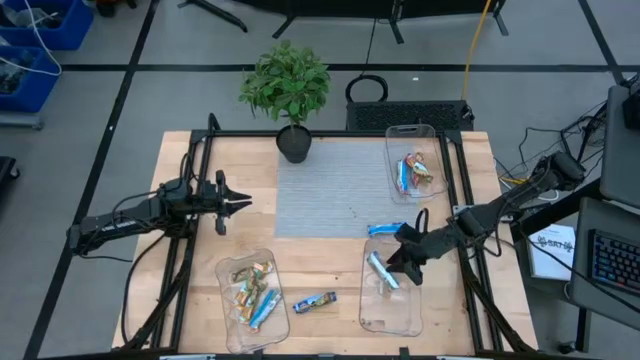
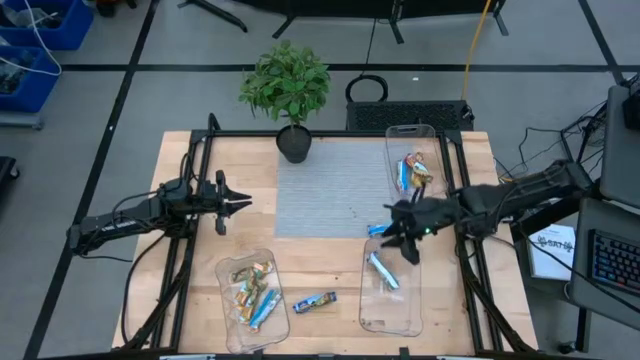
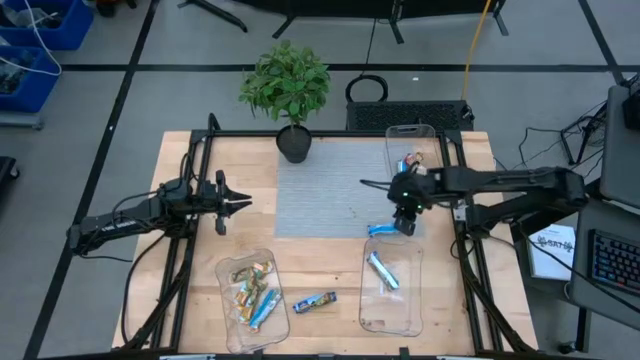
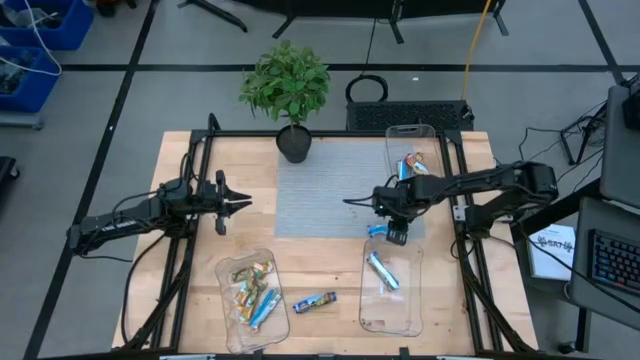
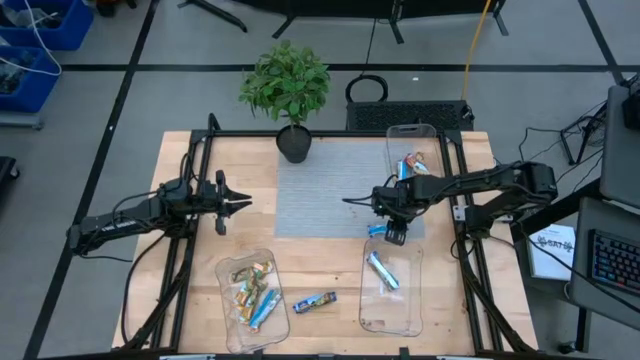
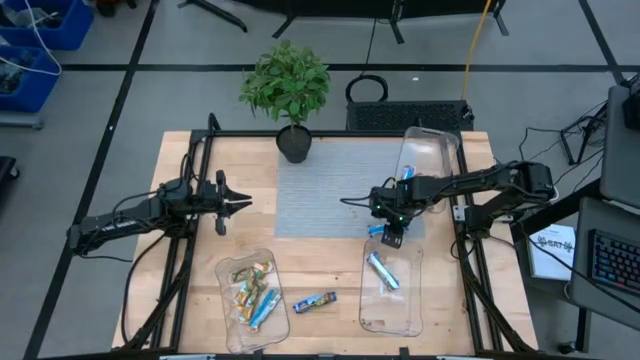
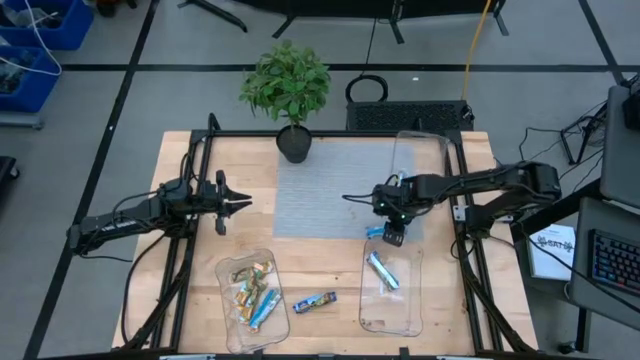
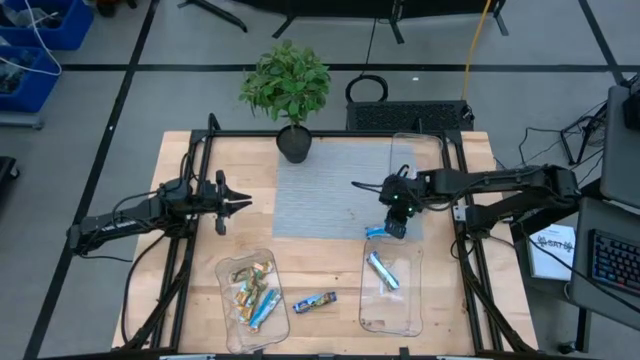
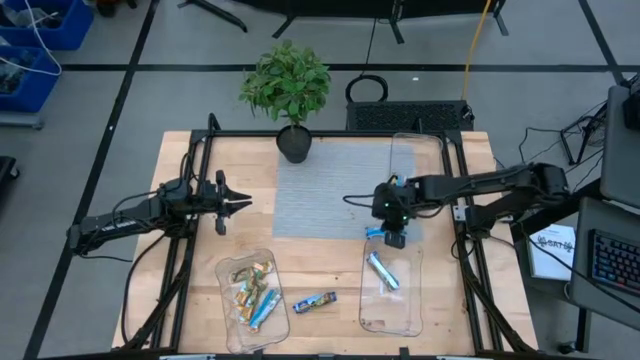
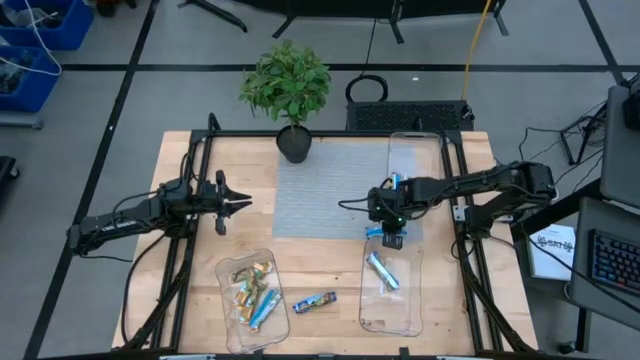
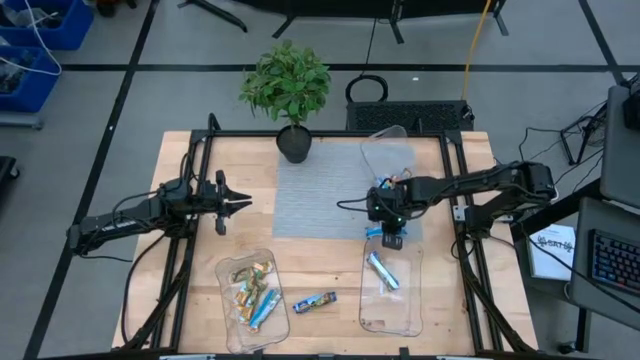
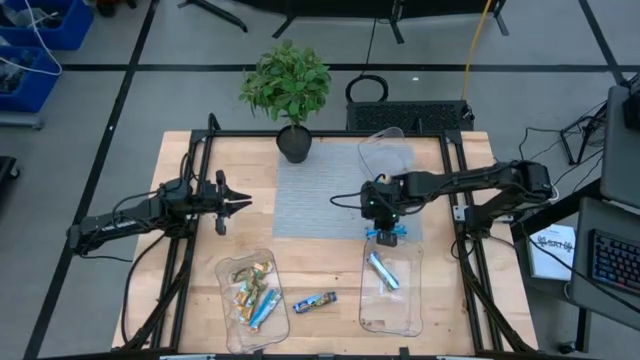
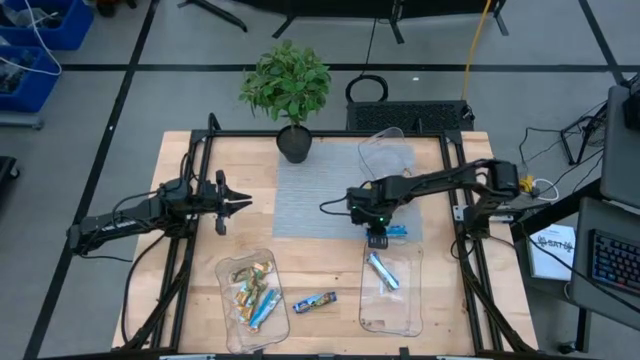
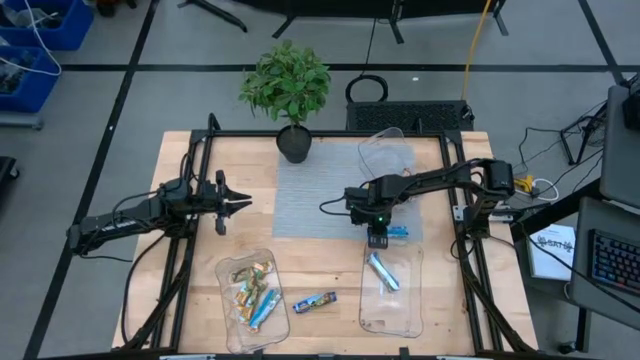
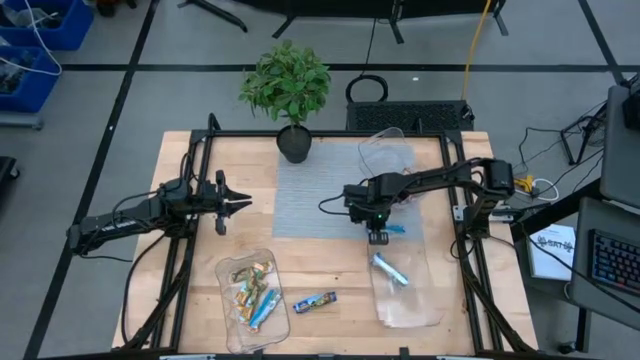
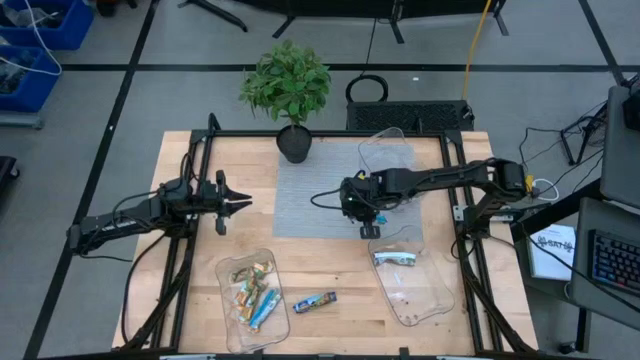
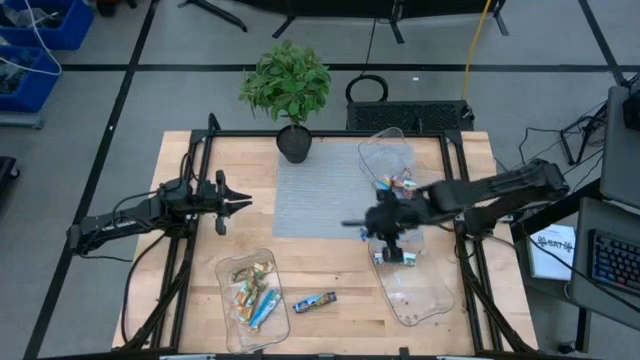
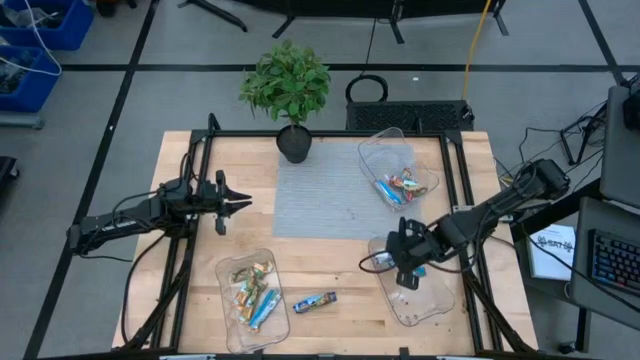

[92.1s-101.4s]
Task: Pick and place Granola Bars by type
Put the top blue granola bar into the bottom right transparent bin

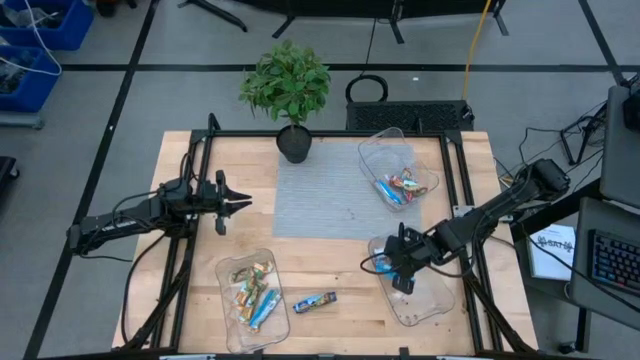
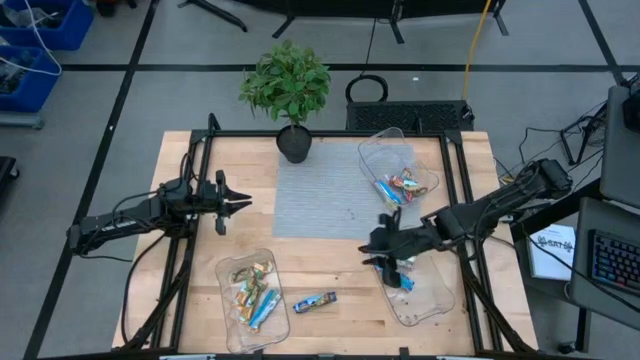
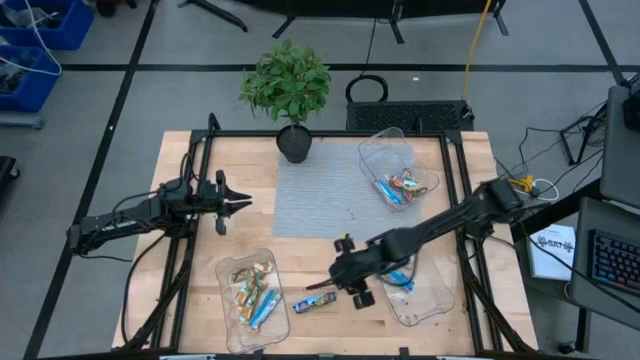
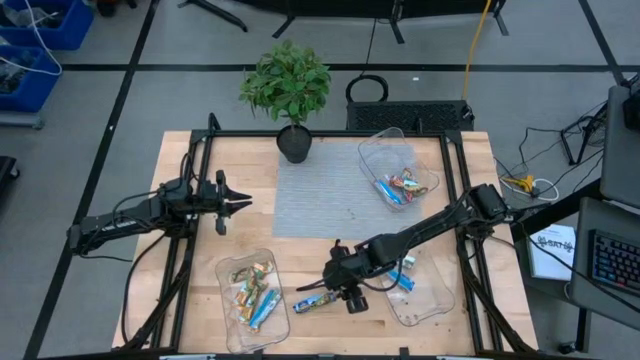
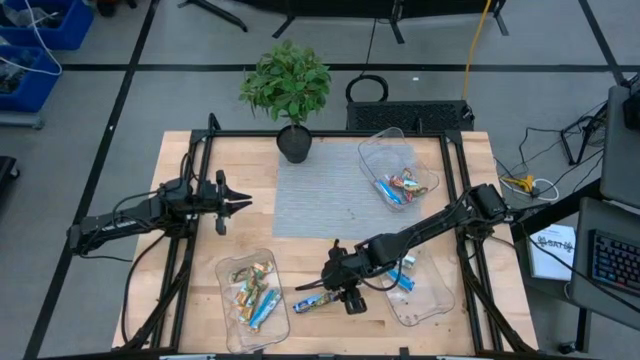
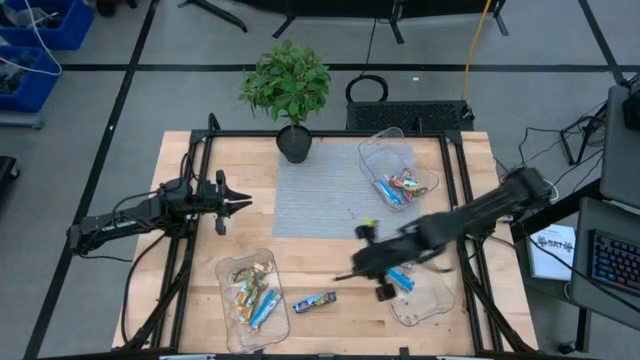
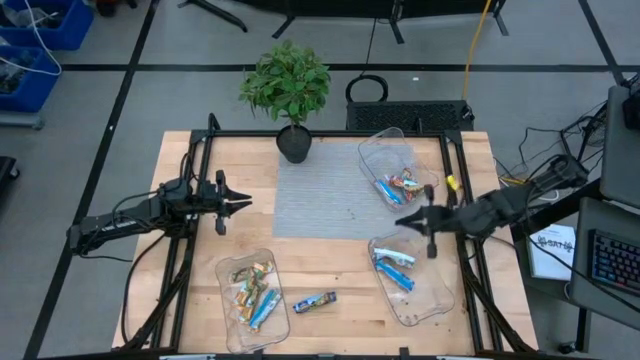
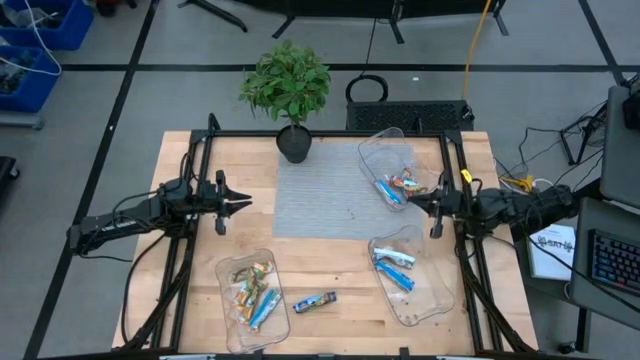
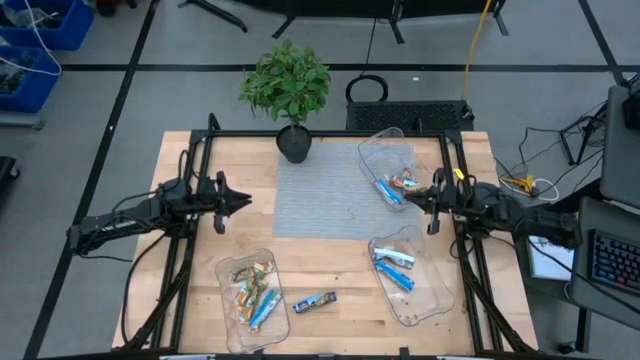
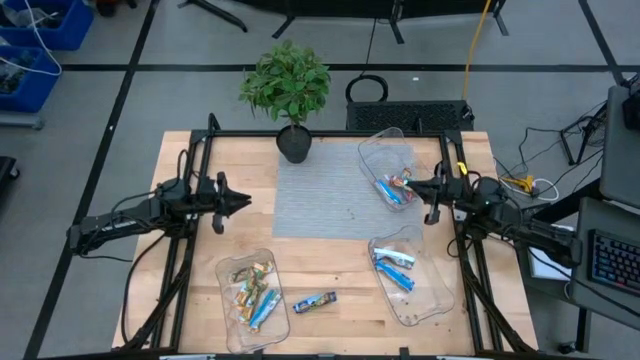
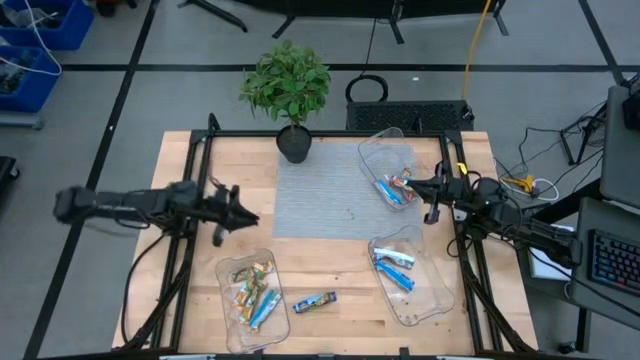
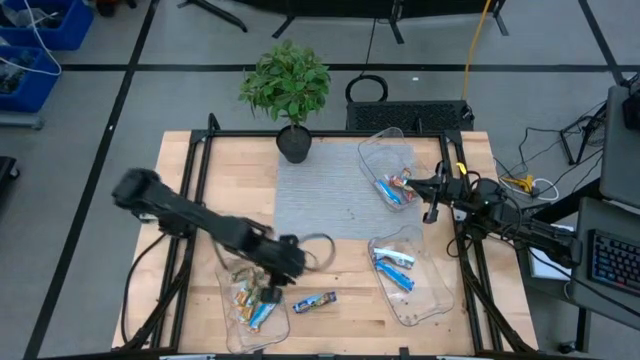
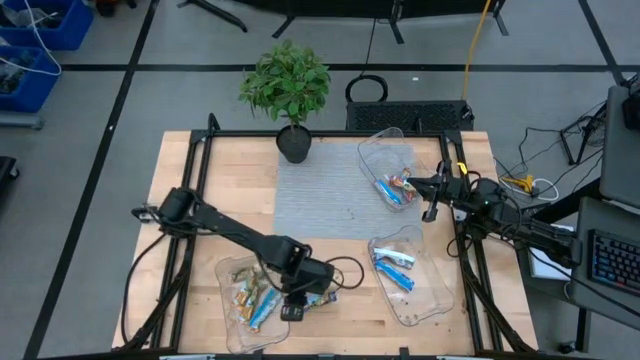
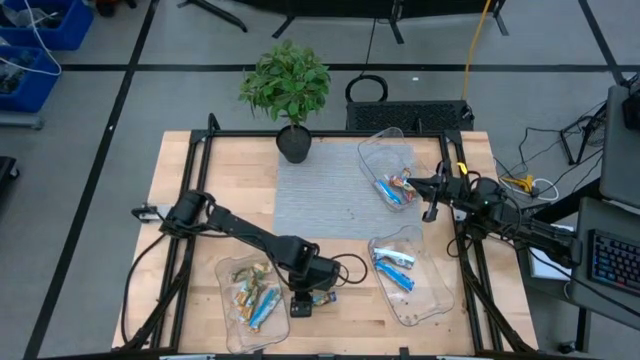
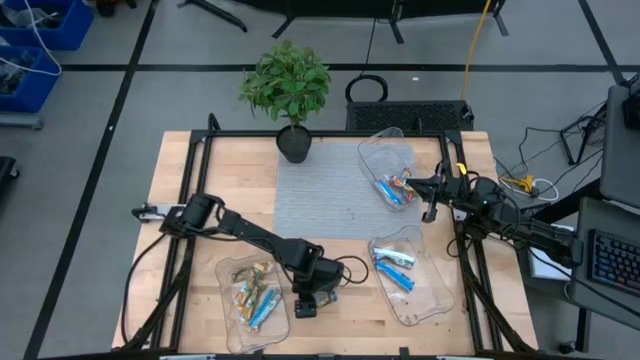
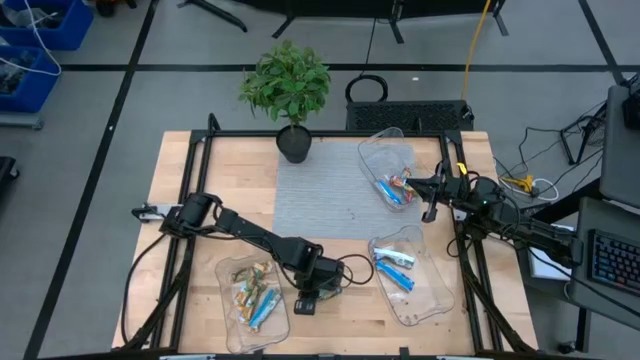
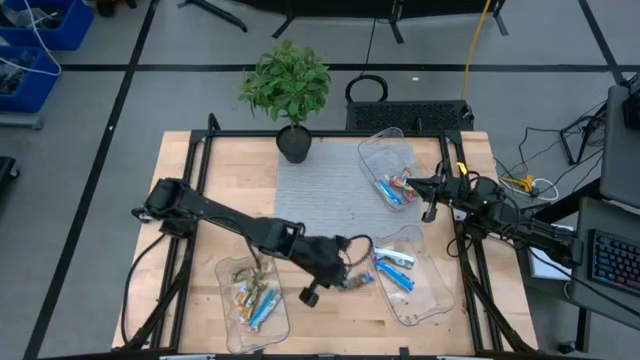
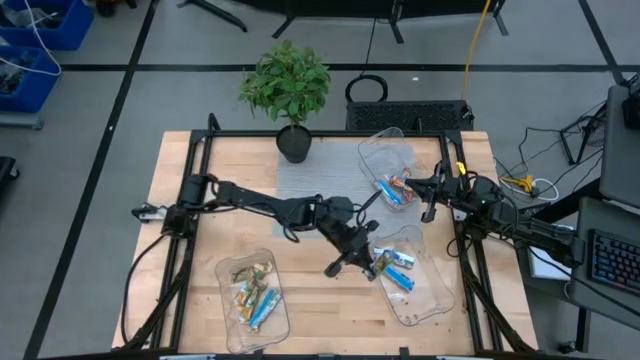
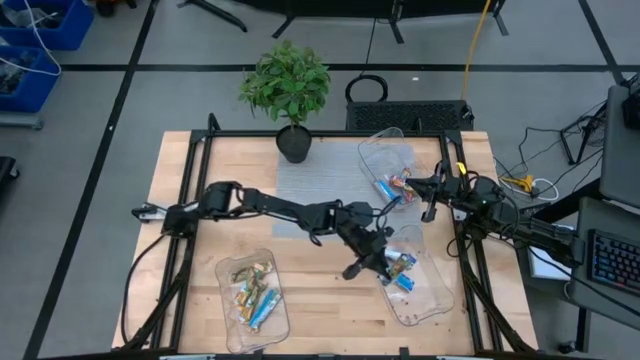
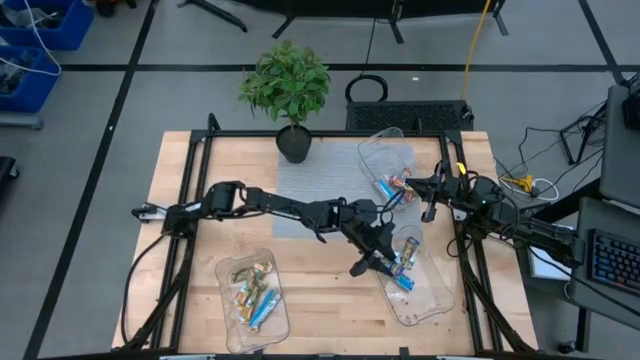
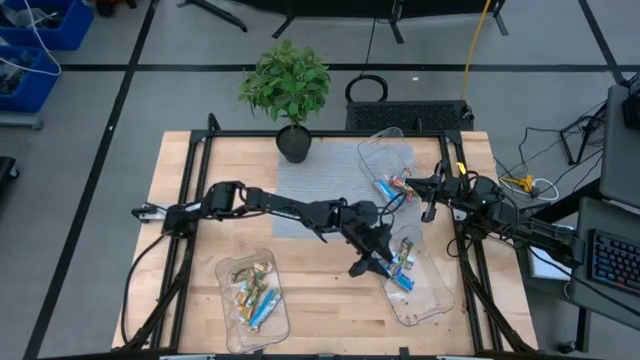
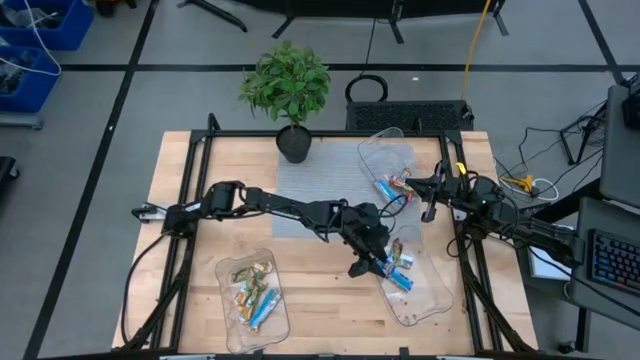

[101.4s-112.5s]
Put the blue granola bar into the bottom right transparent bin

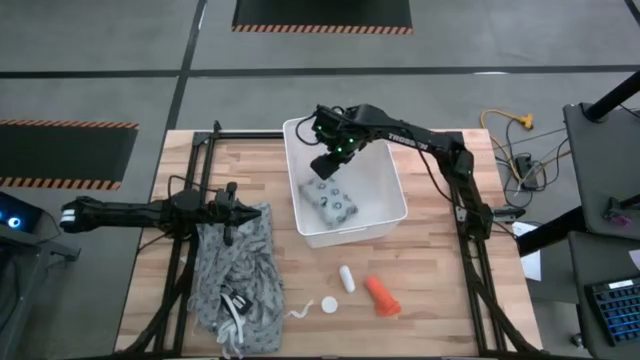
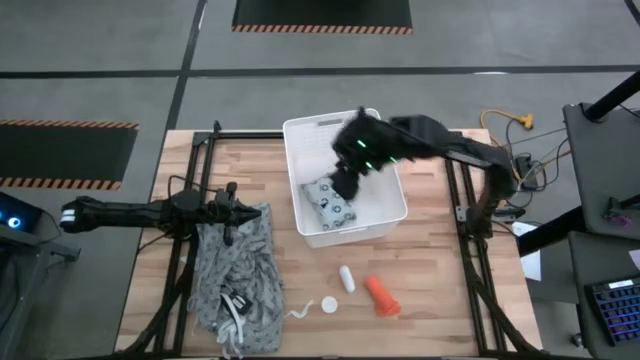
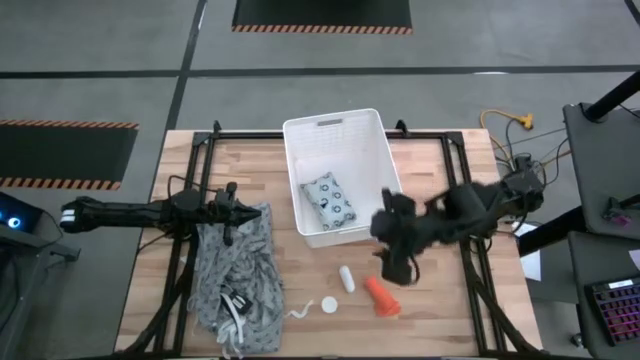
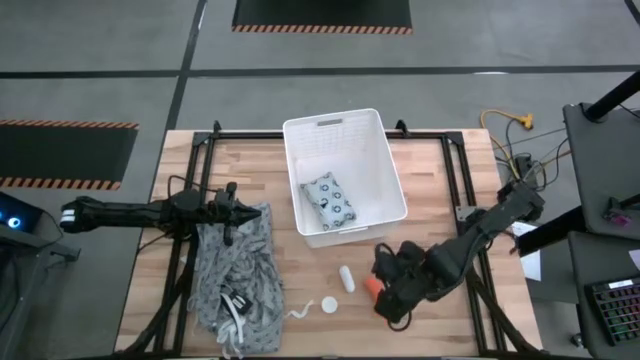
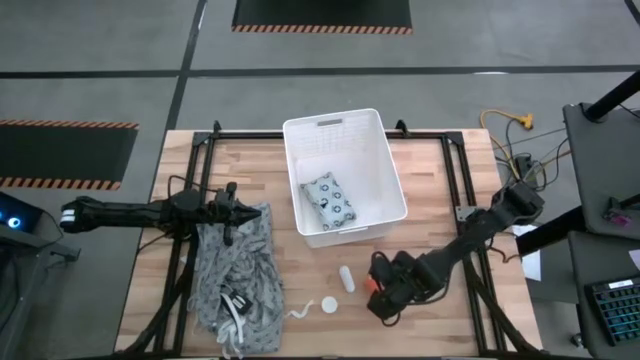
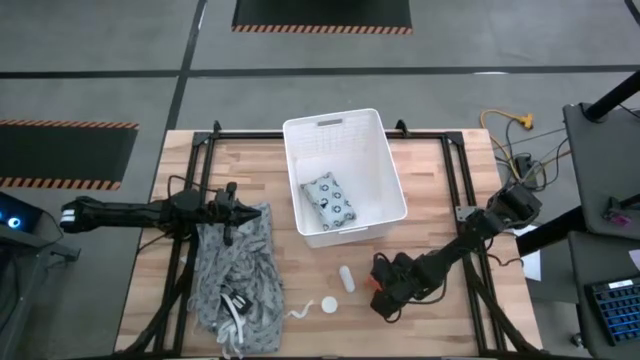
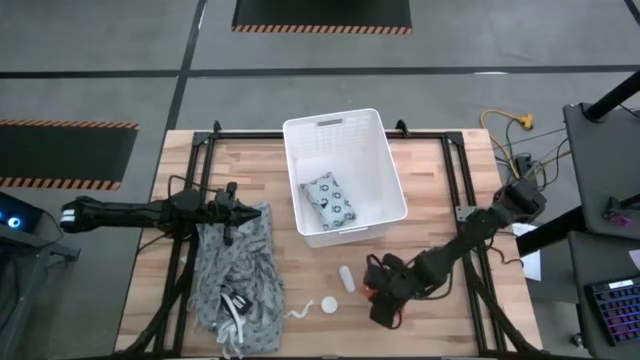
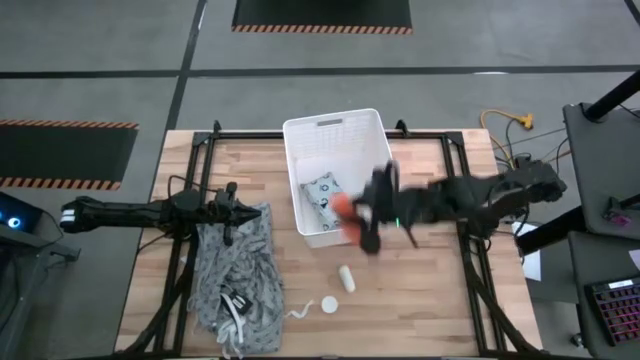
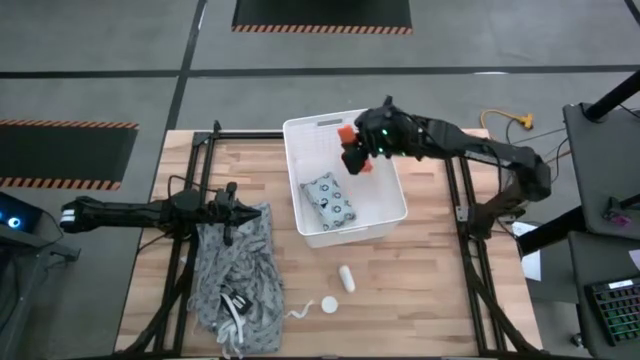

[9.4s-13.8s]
Task: Pick & place medical supplies in basket/bin
Put the orange bandage into the white bin
